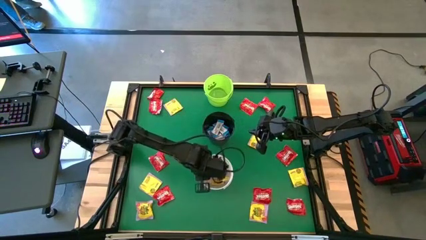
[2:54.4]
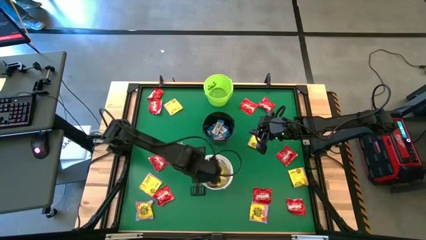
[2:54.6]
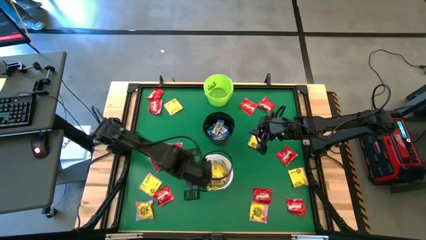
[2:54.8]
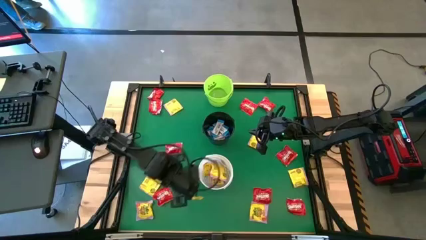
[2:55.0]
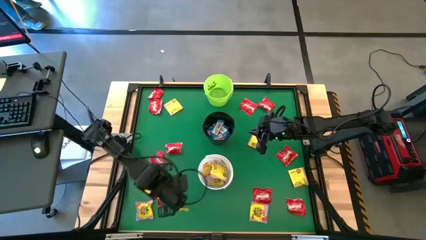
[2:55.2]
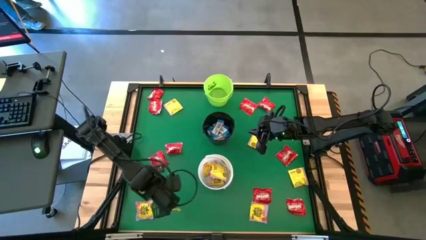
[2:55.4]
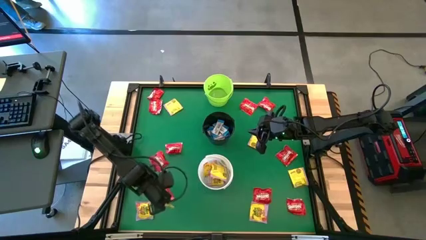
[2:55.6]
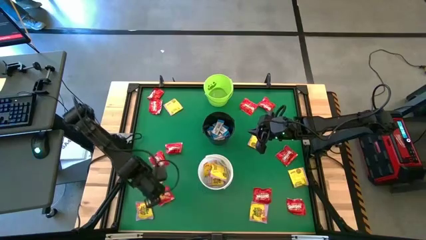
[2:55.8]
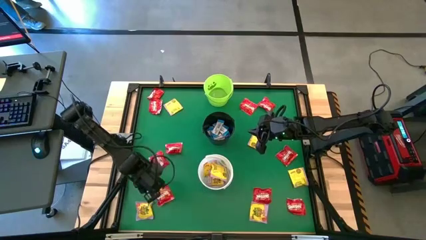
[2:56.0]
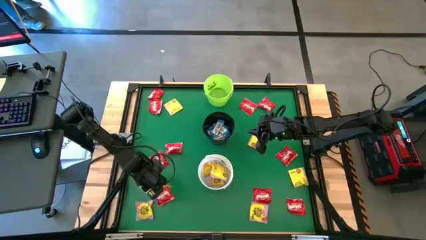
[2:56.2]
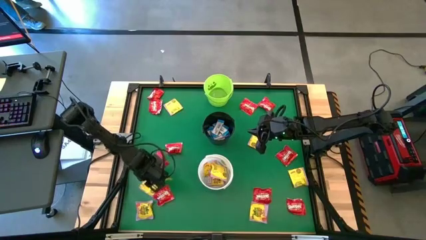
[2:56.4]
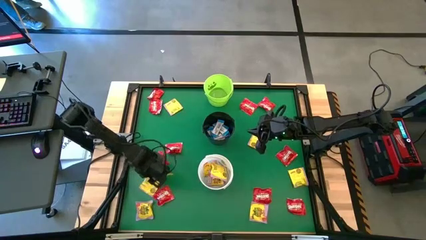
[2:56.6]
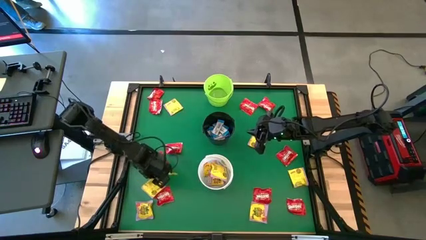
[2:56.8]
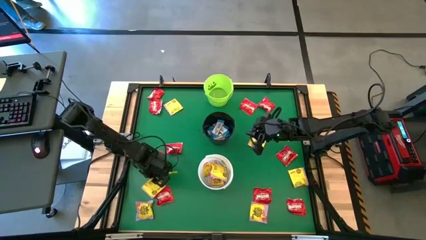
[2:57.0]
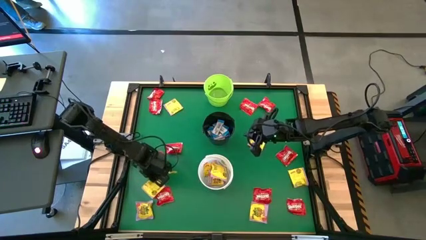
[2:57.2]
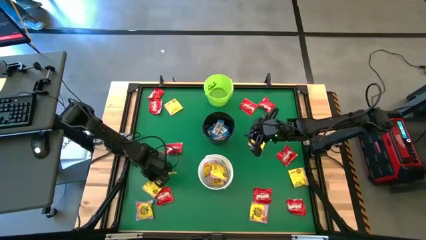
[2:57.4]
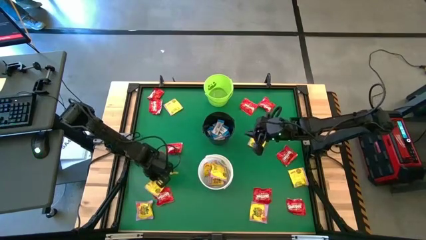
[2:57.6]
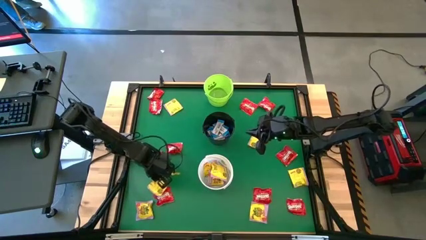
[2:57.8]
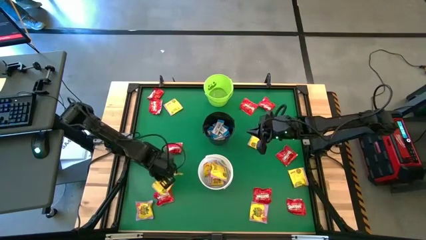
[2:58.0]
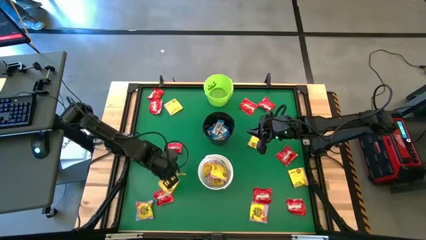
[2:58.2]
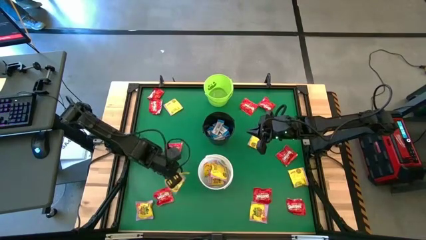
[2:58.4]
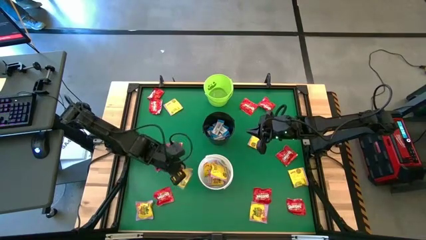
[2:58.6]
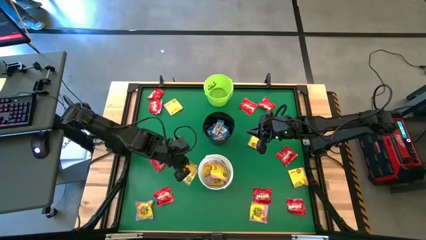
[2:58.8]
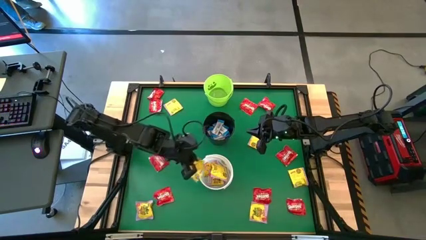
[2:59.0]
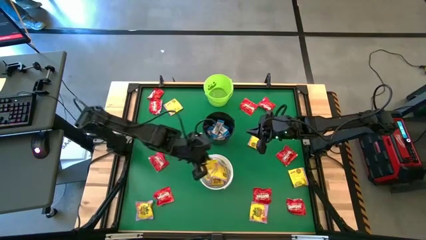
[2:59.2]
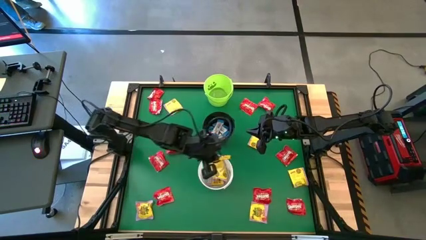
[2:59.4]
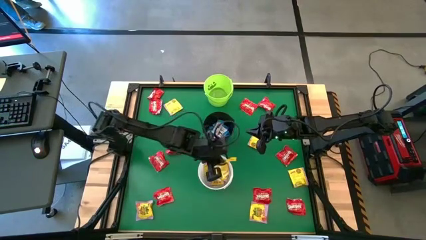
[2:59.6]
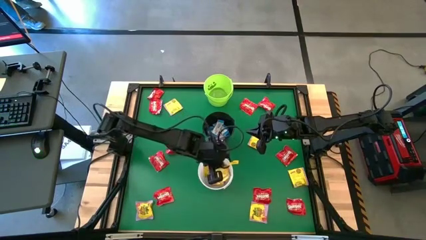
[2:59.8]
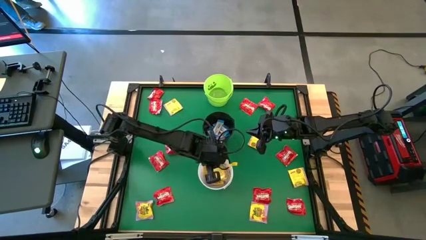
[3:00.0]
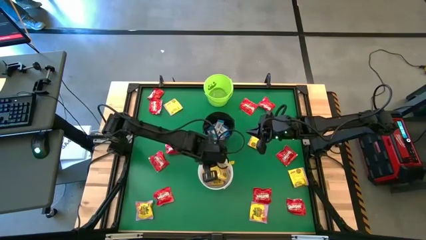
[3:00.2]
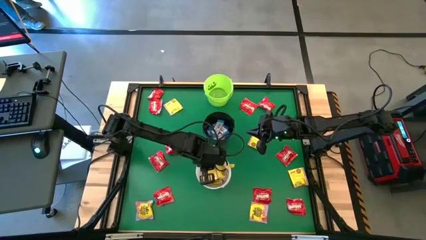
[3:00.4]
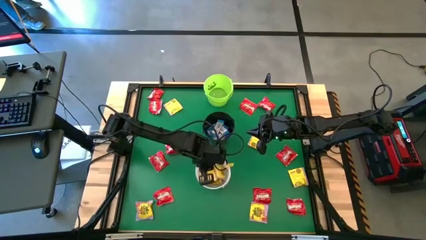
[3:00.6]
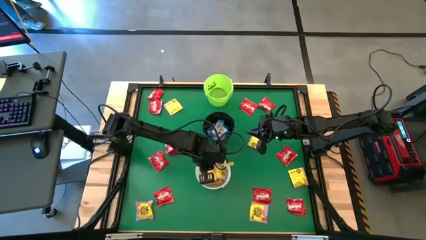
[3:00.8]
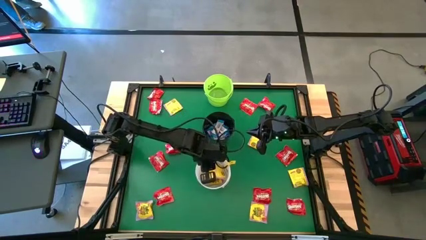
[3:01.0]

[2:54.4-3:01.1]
Task: Sort candy by brand, put in halloween buckets
Put the yellow candy into the white bucket

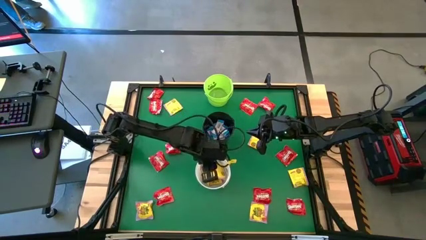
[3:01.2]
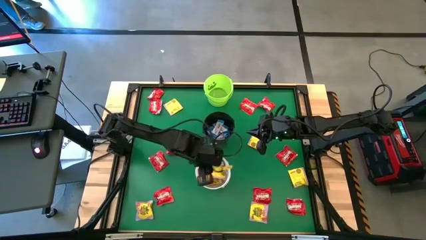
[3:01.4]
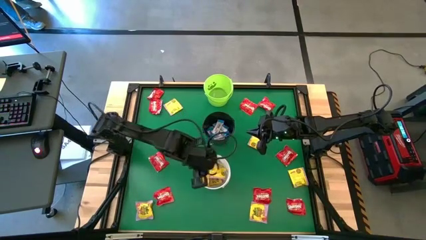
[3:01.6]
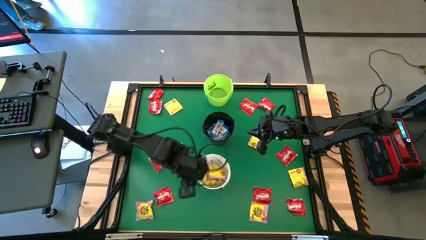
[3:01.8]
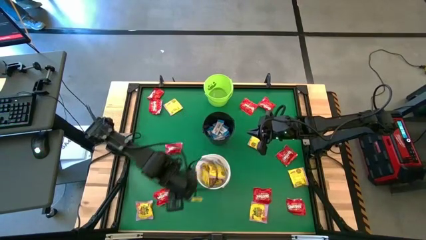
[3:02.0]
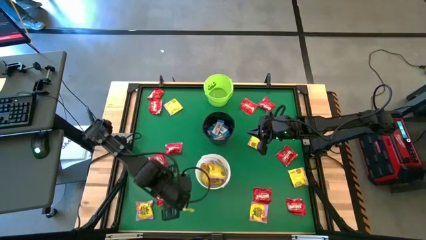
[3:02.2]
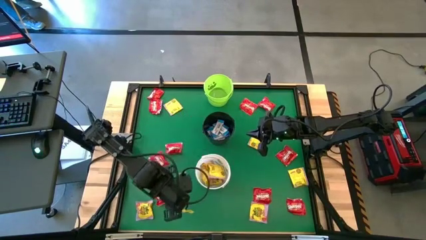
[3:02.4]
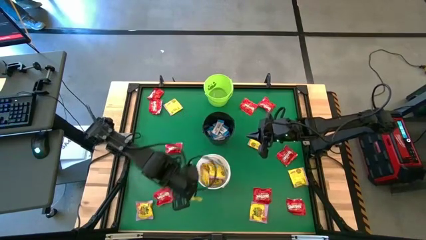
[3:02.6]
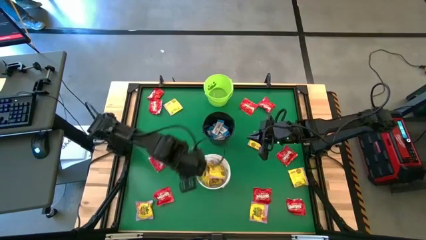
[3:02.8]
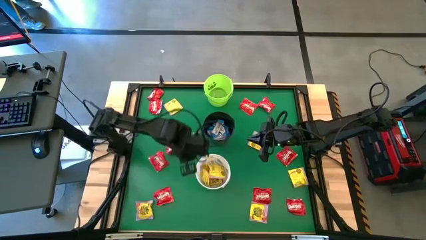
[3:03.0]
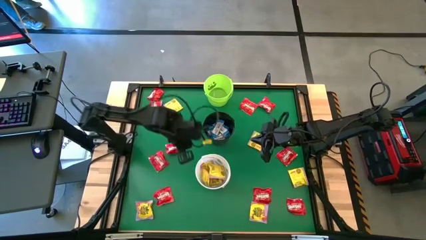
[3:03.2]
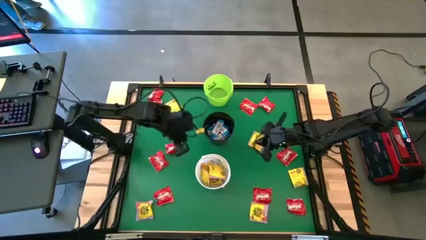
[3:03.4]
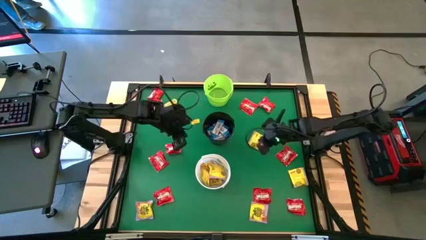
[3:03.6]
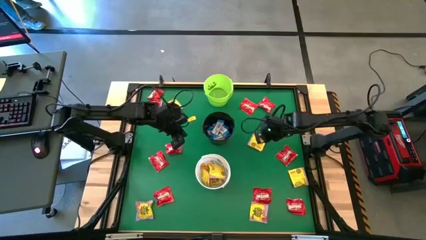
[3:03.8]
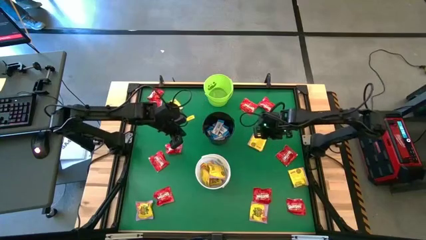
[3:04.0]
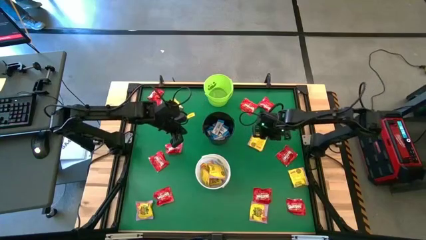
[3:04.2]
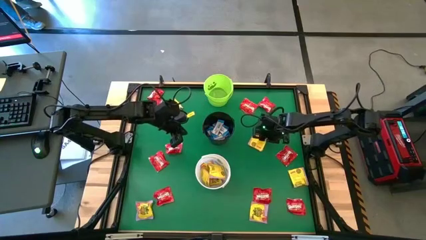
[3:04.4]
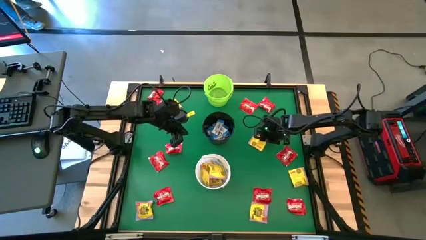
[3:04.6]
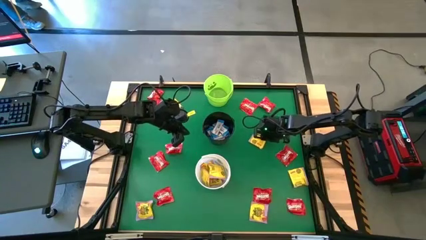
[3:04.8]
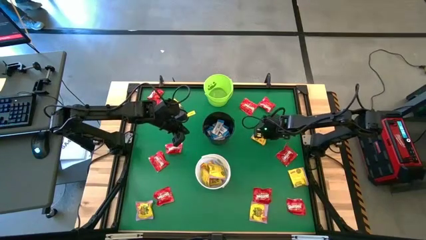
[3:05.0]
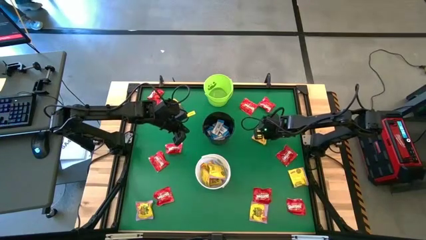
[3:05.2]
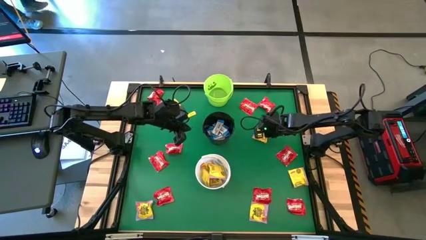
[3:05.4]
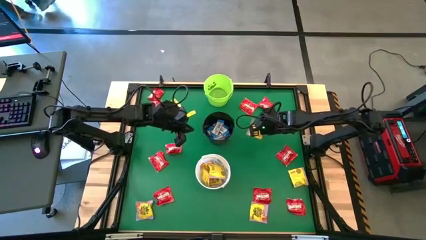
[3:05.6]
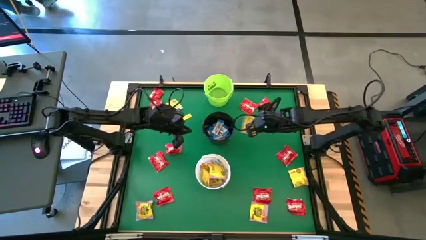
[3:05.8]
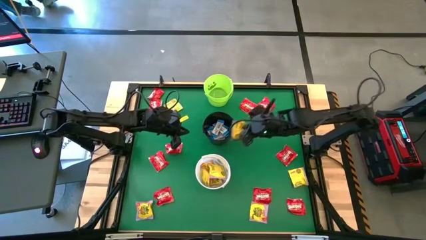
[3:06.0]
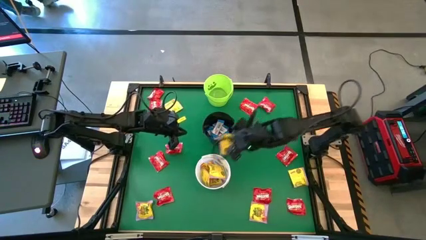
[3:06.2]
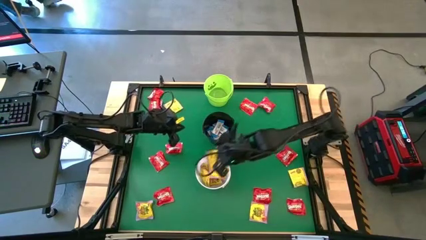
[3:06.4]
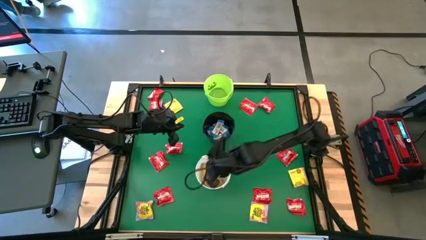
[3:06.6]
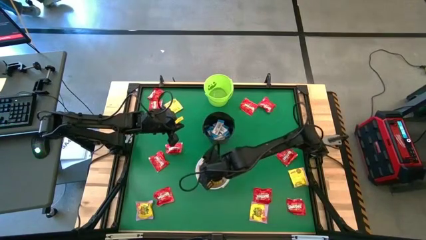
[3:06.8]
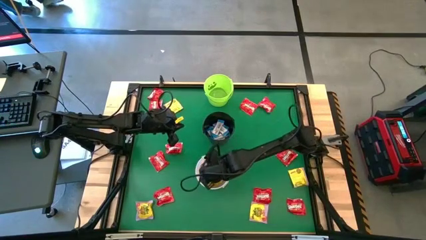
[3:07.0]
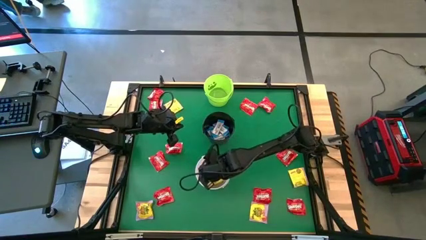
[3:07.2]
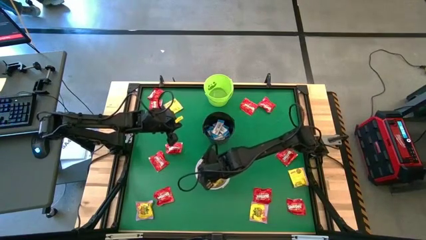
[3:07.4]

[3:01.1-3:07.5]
Put the yellow candy into the white bucket

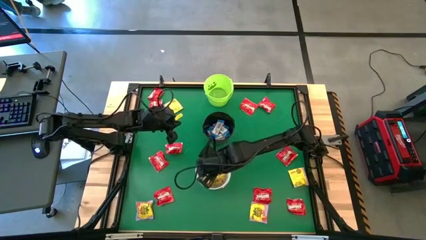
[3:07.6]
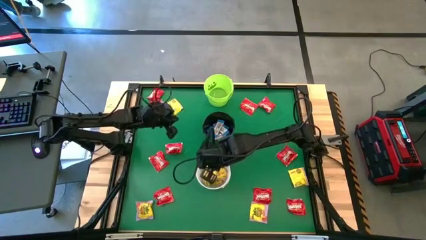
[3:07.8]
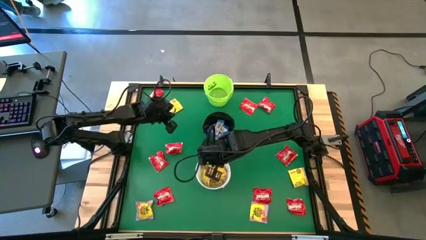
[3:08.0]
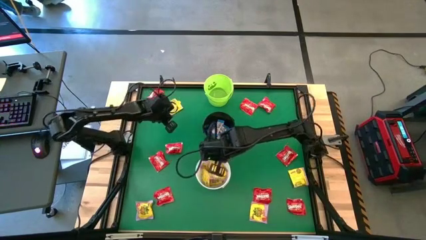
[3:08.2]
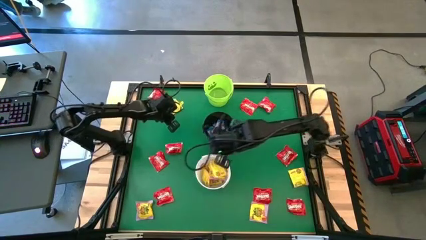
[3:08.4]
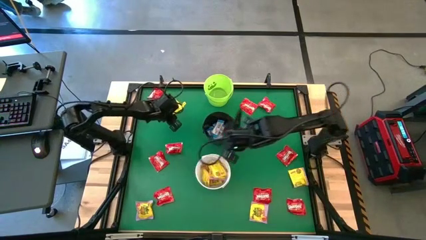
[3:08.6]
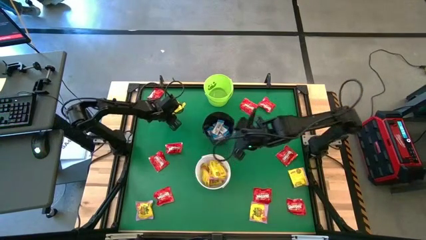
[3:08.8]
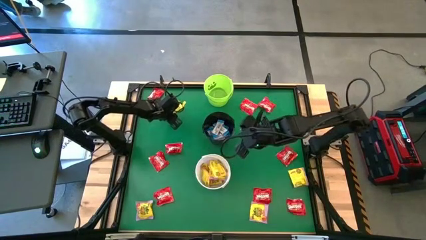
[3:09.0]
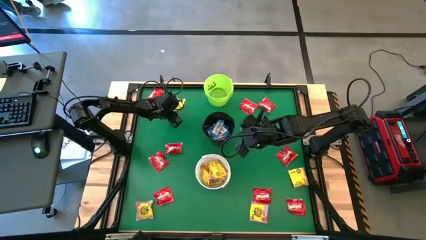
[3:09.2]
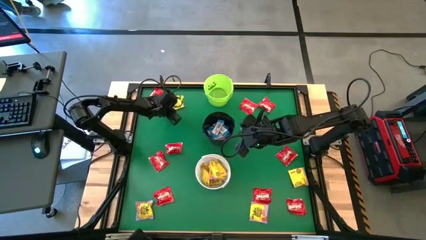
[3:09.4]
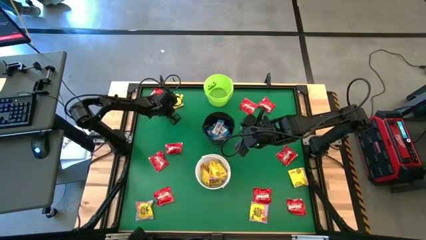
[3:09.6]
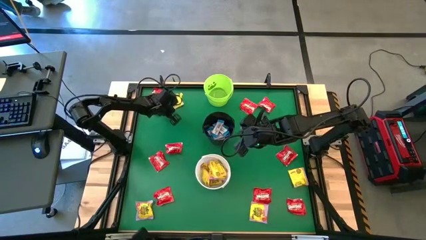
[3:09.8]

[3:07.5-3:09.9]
Put the yellow candy into the white bucket

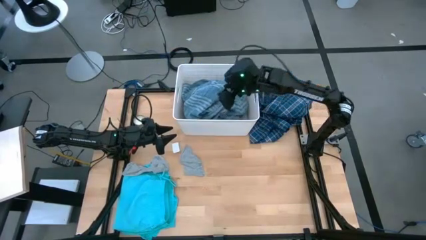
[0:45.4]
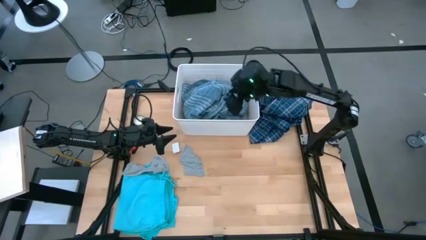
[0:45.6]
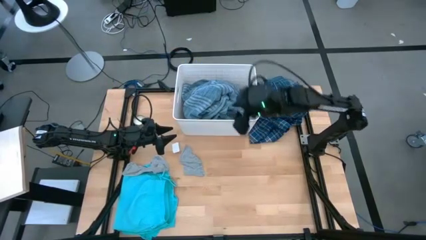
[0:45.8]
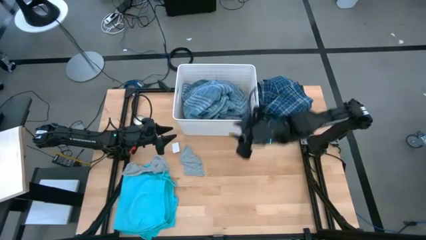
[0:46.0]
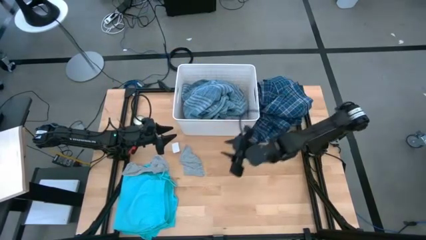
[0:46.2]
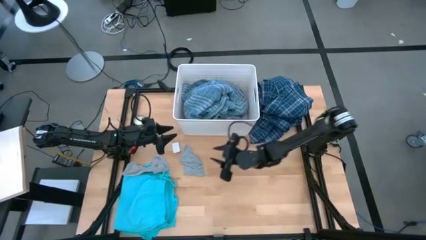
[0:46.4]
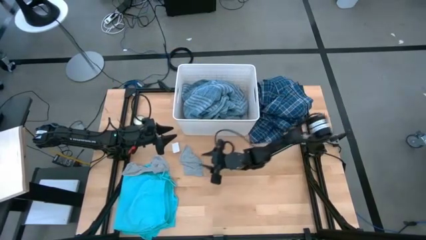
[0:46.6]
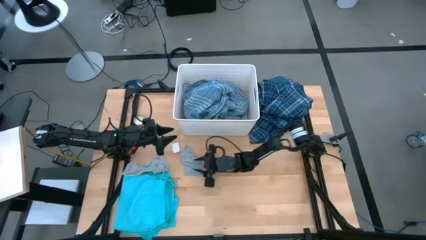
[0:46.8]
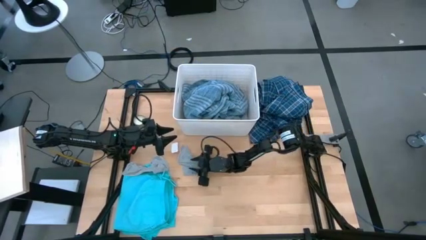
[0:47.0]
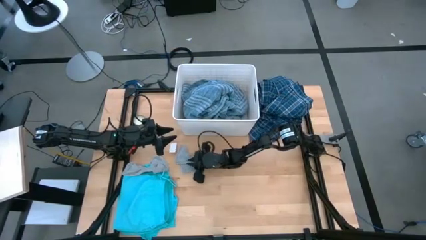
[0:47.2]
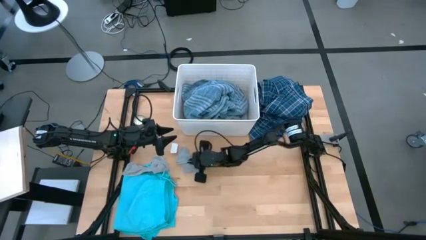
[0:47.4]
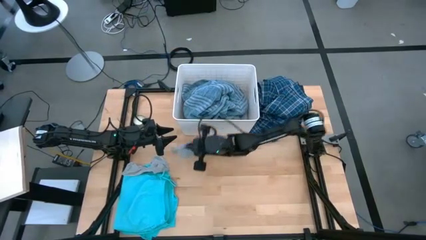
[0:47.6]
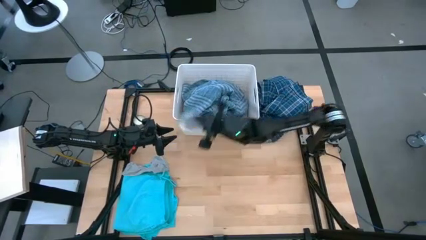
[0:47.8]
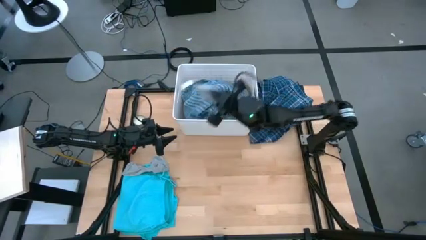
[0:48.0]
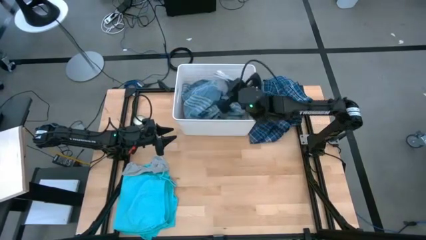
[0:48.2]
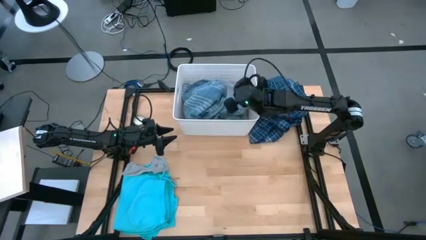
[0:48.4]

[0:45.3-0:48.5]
Task: Sort clothes
Put the gray sock into the white laundry bin
